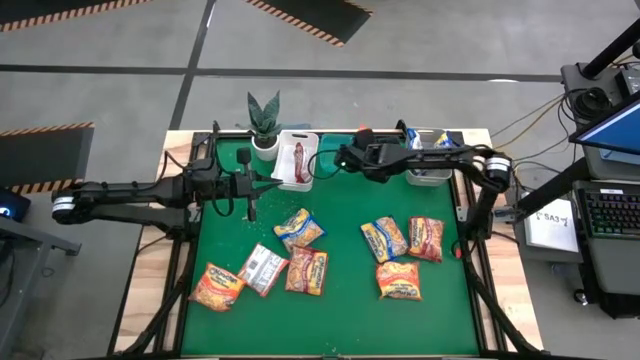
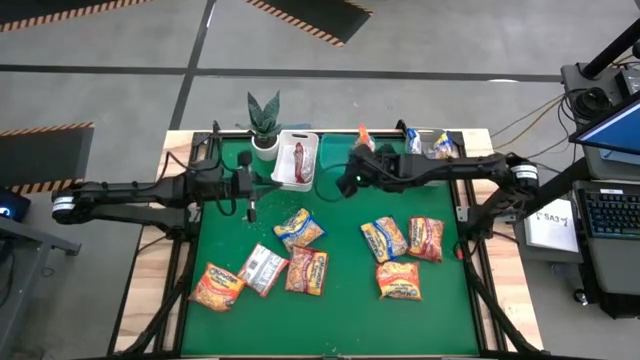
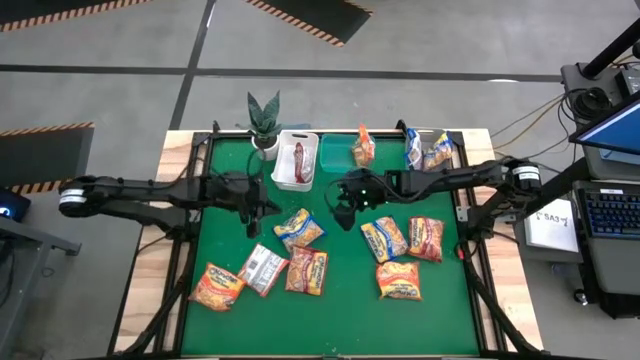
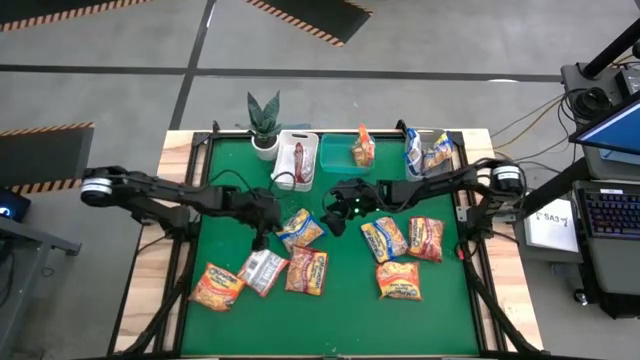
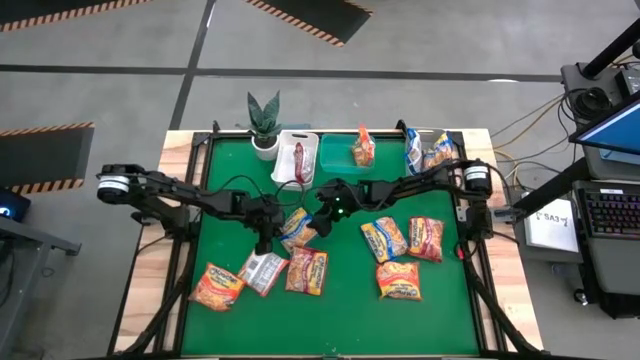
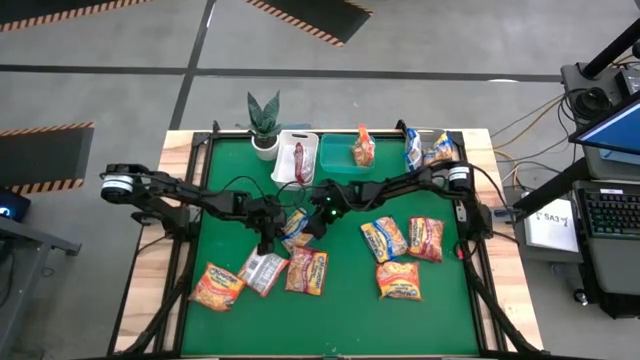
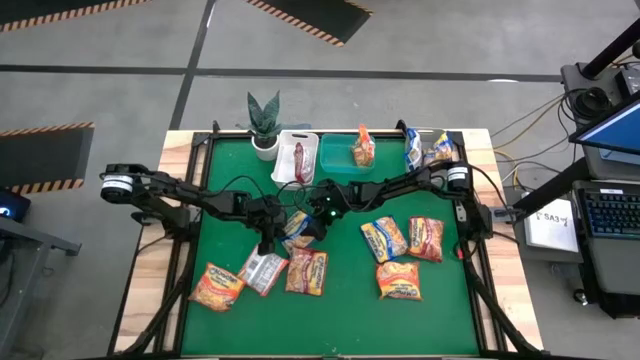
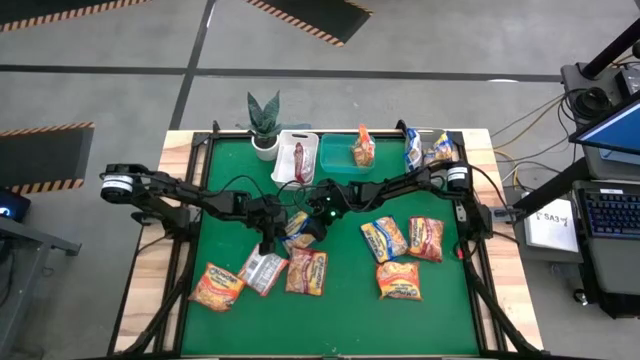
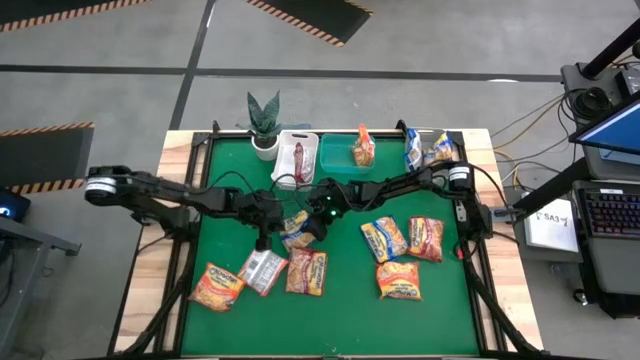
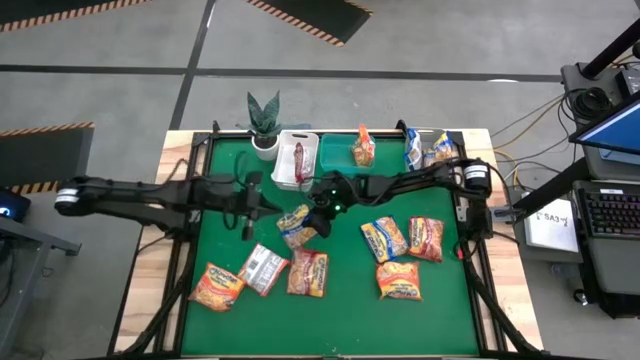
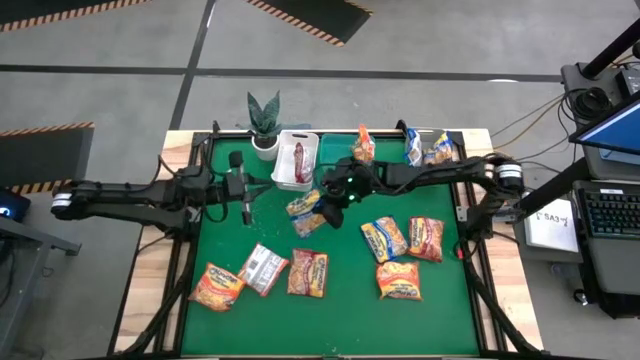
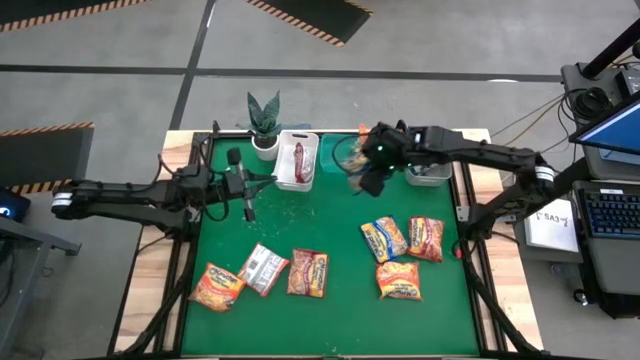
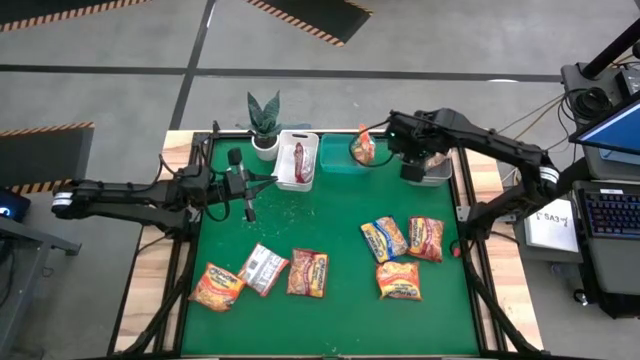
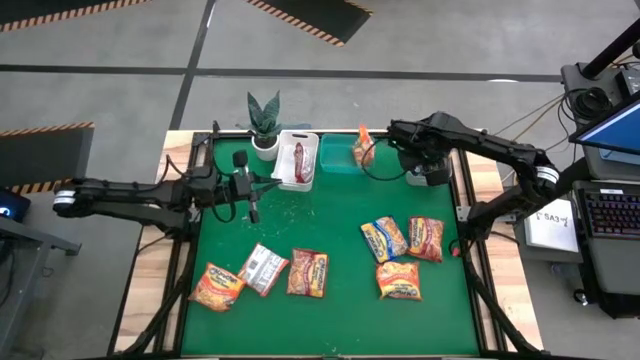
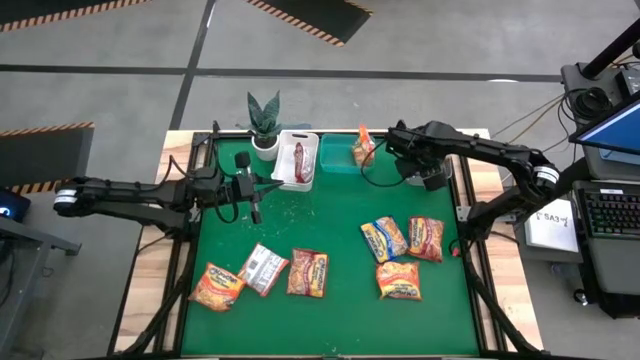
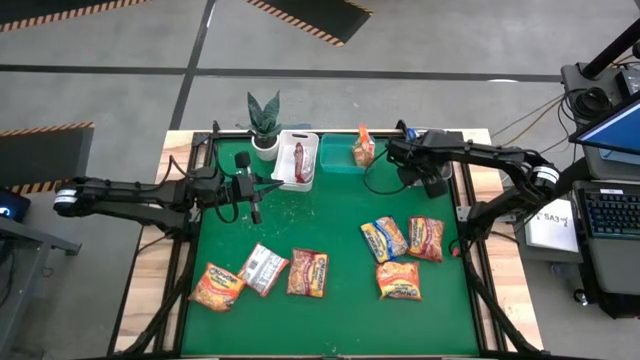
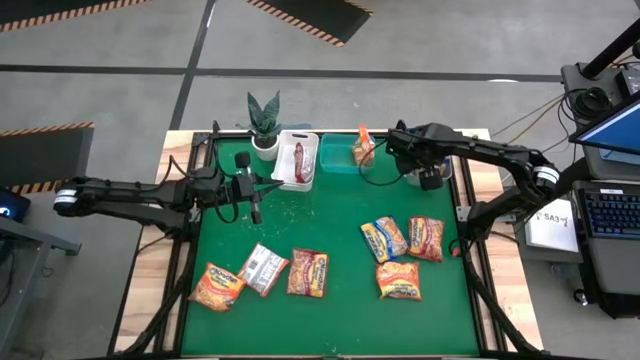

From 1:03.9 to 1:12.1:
Task: Sort Maruchan noodles
Put the blue noodle pack into the gray bin

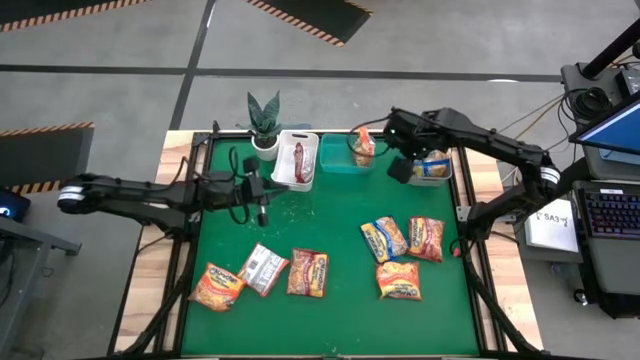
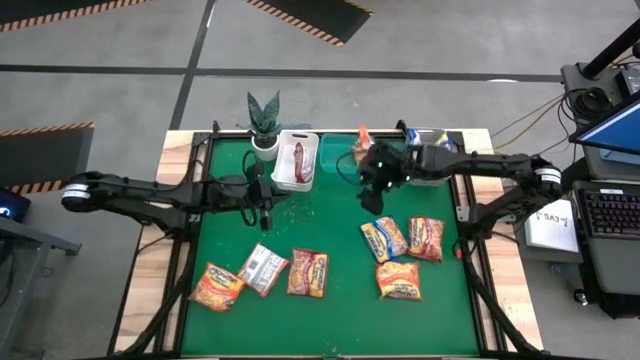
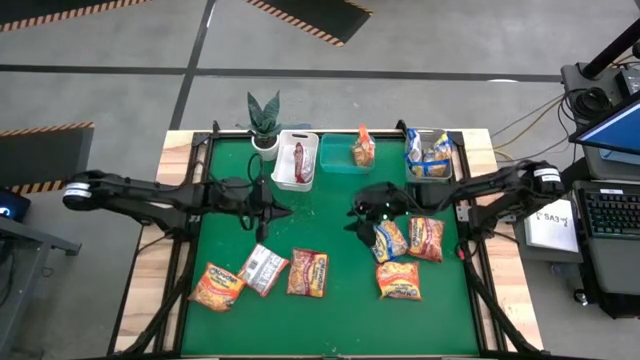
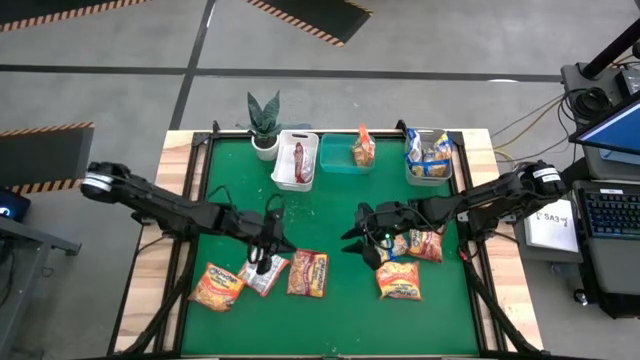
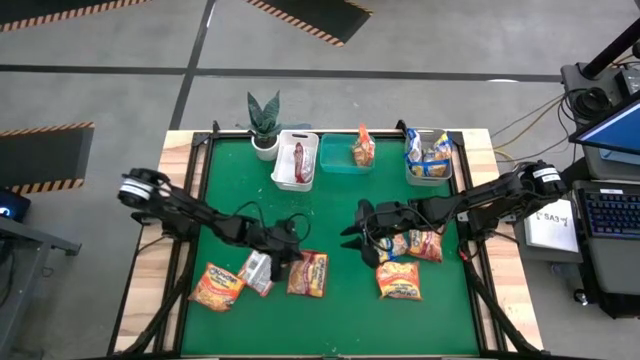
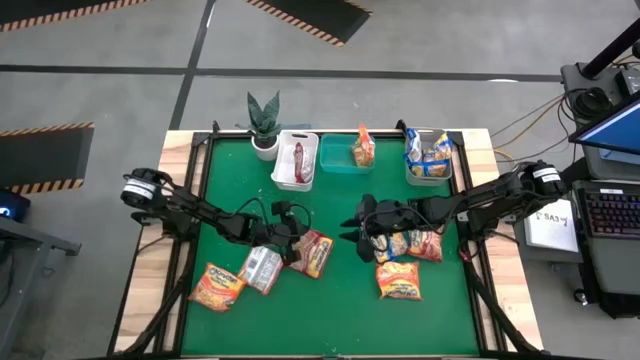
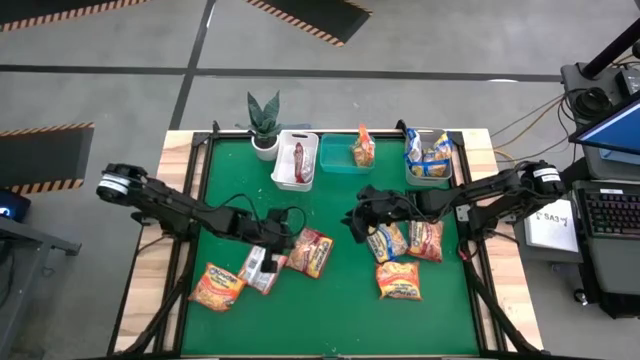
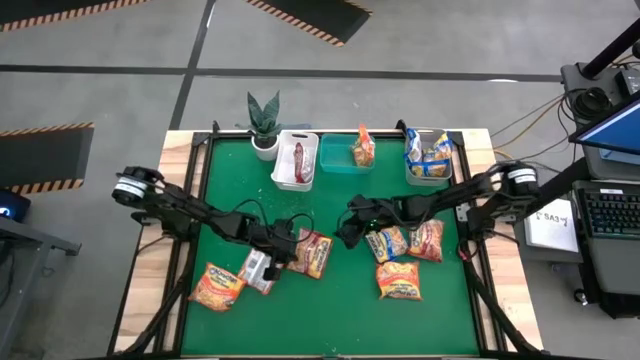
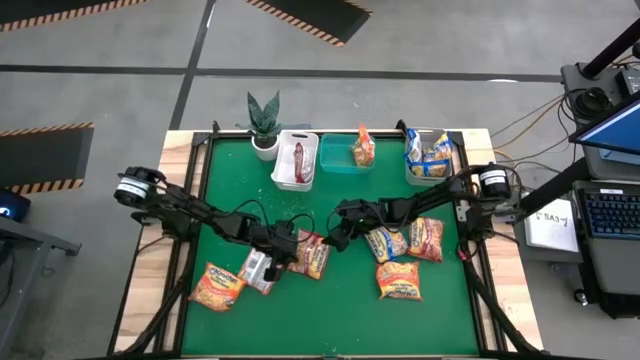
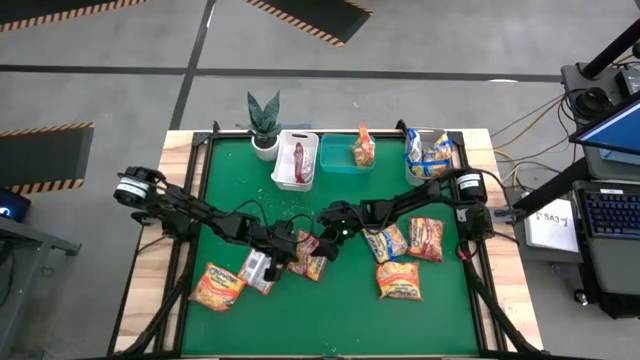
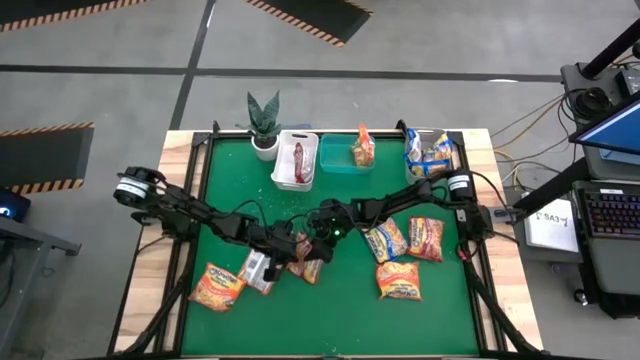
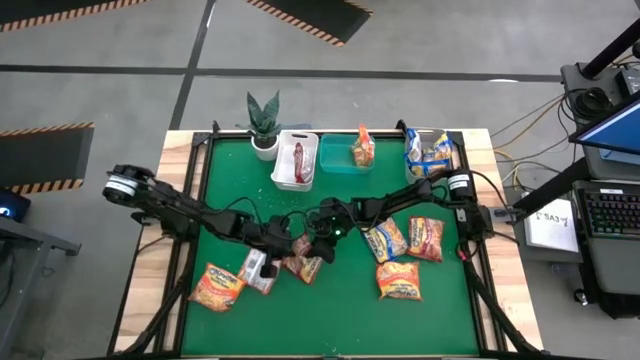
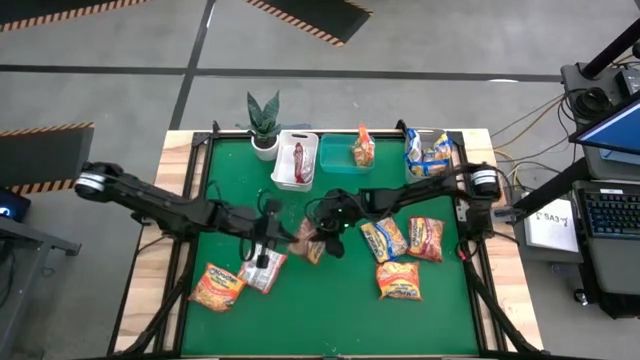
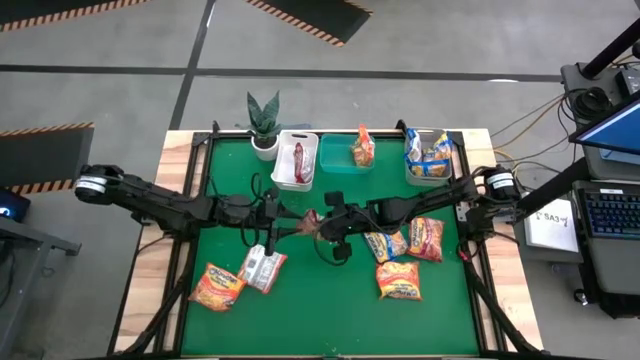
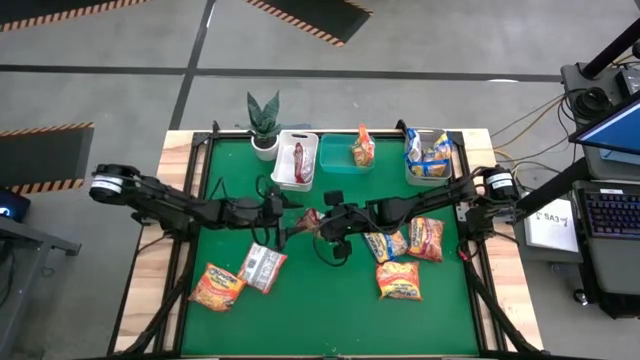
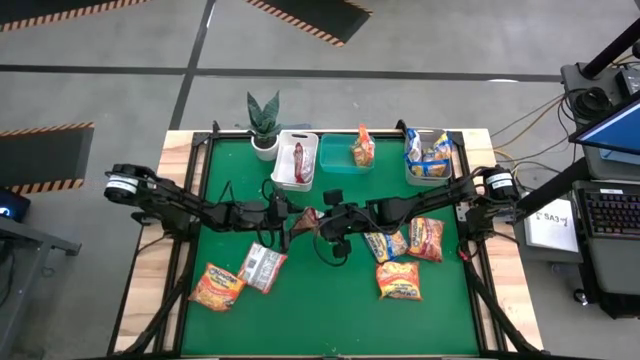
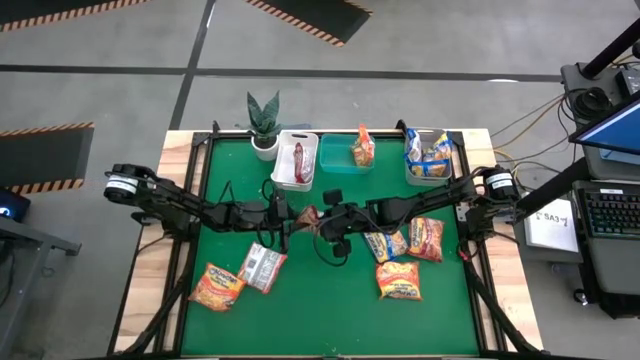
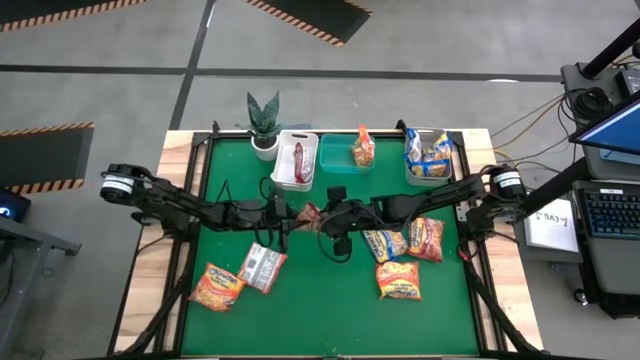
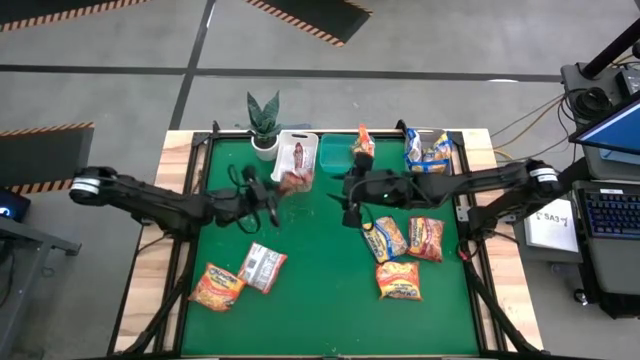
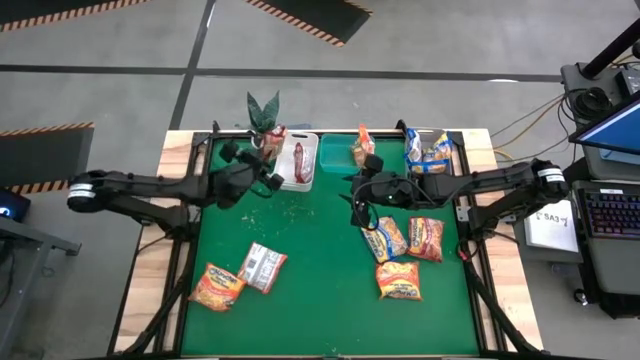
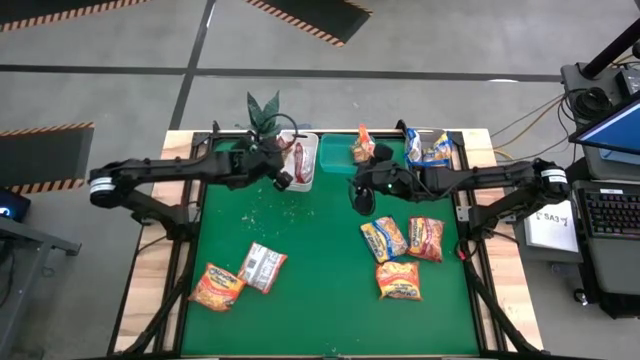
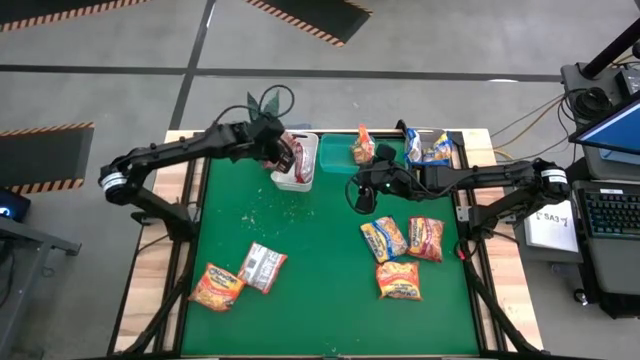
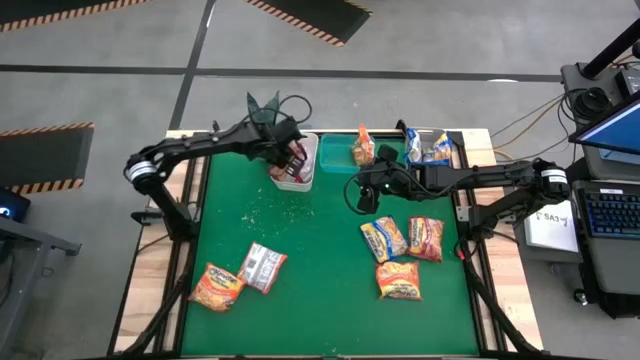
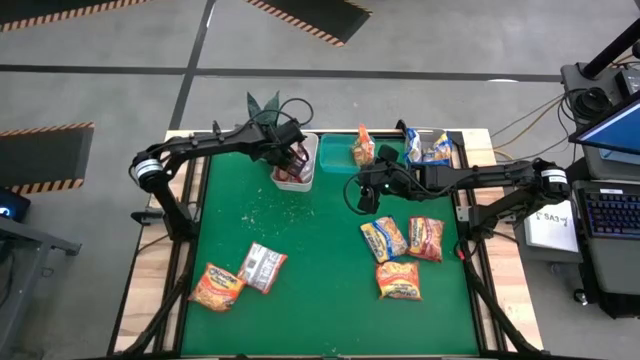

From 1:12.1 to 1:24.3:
Put the red noodle pack into the white bin
